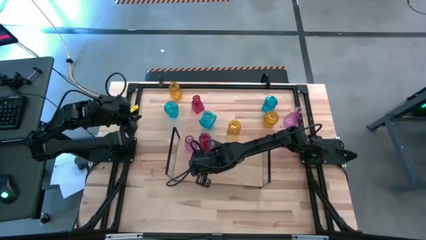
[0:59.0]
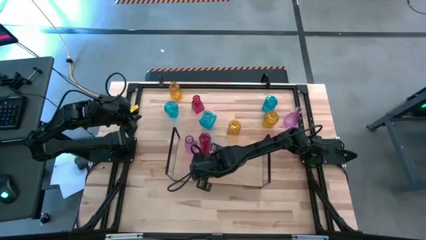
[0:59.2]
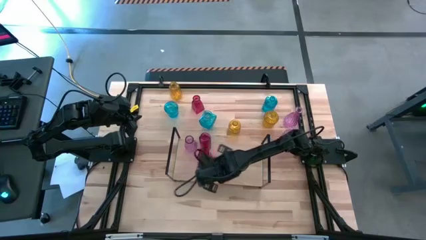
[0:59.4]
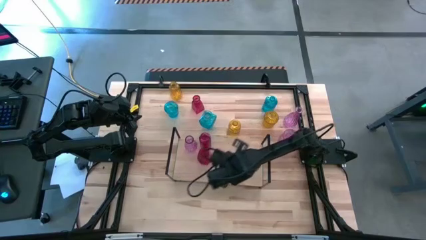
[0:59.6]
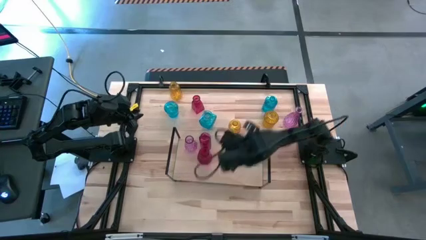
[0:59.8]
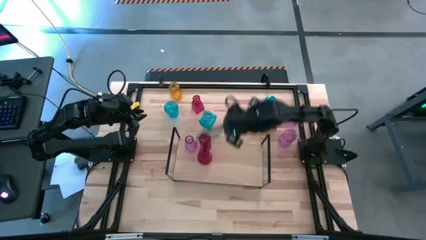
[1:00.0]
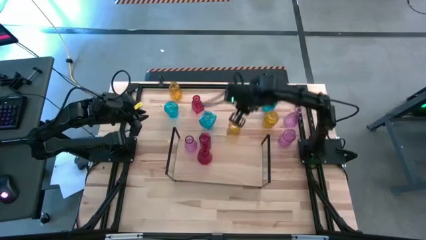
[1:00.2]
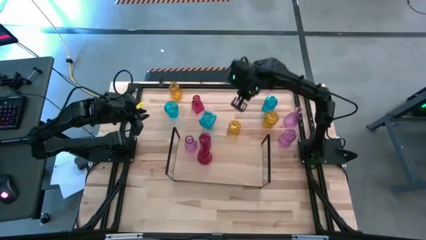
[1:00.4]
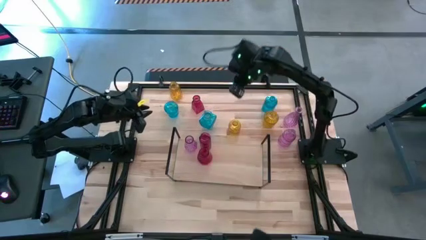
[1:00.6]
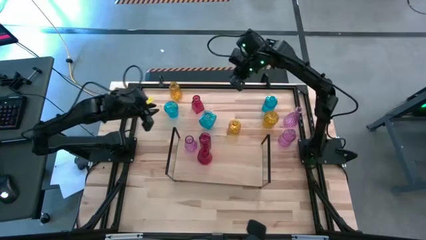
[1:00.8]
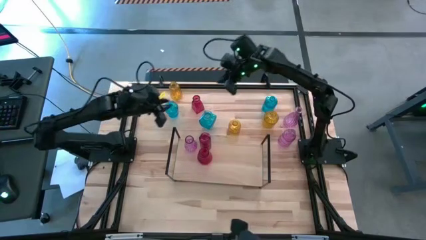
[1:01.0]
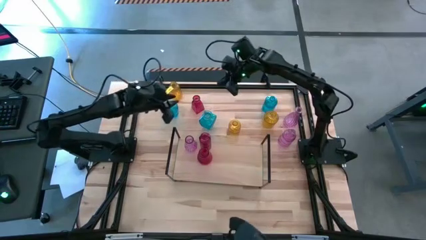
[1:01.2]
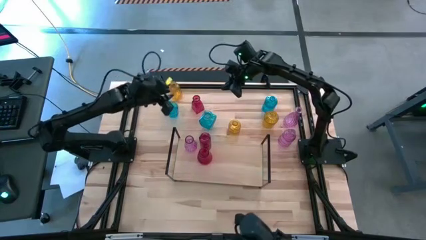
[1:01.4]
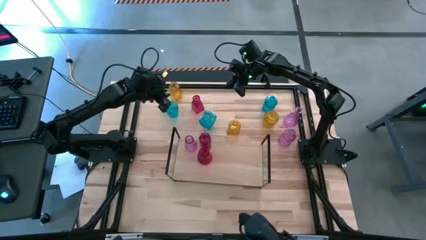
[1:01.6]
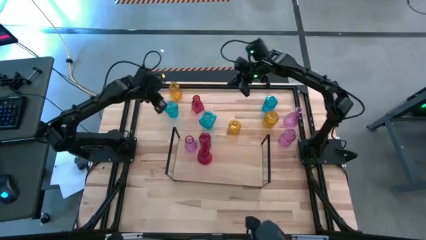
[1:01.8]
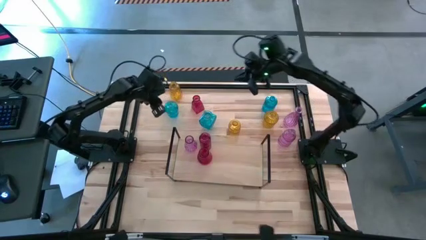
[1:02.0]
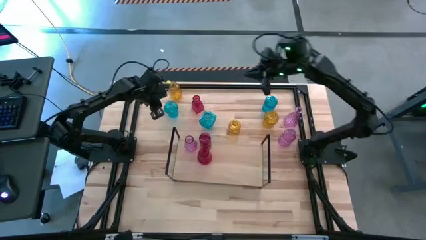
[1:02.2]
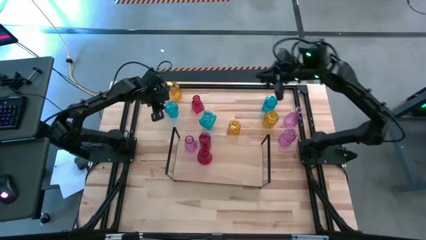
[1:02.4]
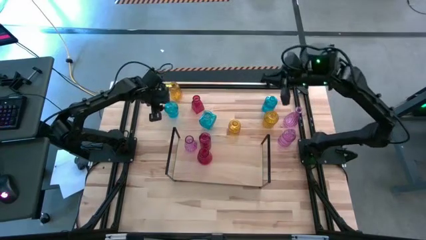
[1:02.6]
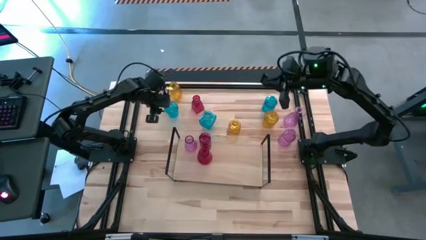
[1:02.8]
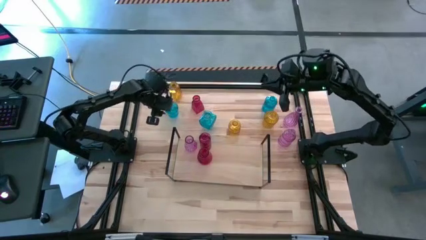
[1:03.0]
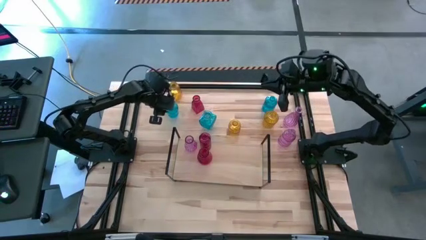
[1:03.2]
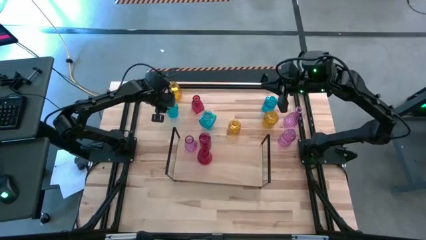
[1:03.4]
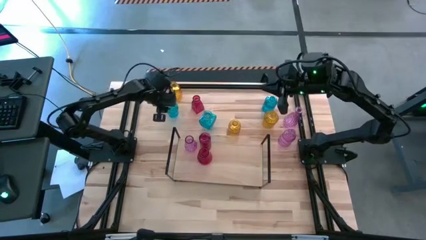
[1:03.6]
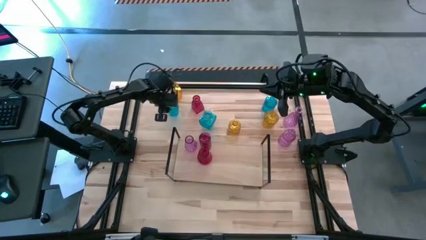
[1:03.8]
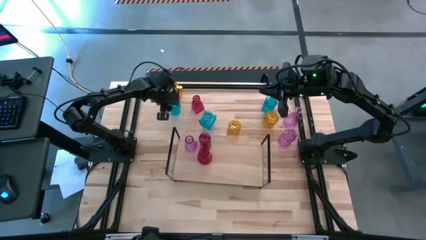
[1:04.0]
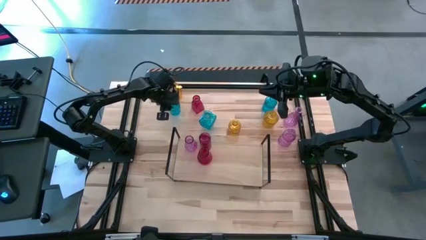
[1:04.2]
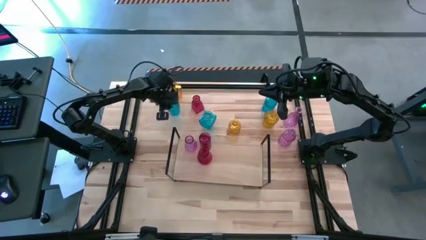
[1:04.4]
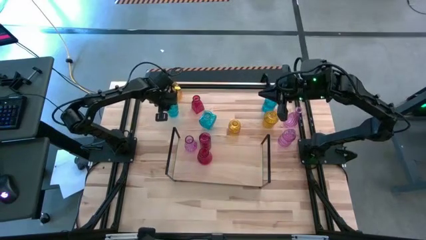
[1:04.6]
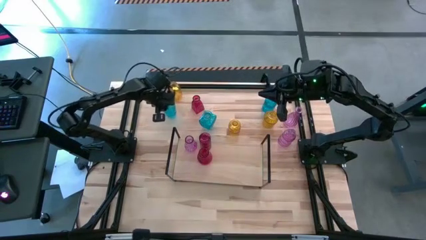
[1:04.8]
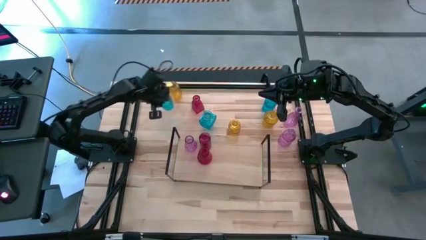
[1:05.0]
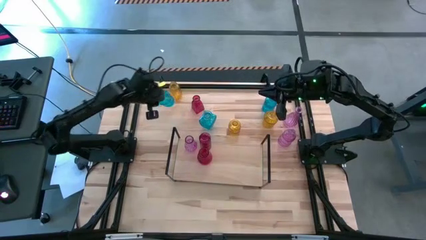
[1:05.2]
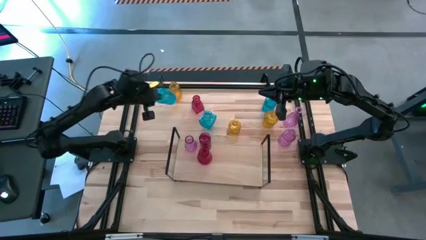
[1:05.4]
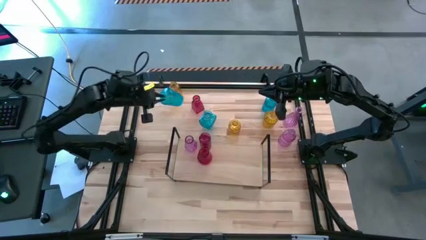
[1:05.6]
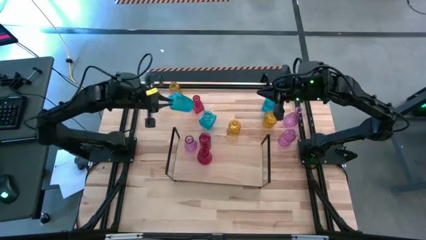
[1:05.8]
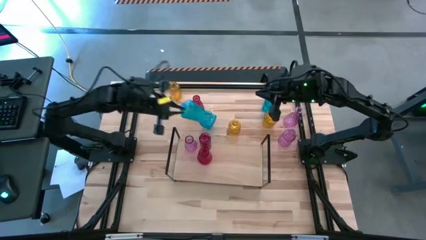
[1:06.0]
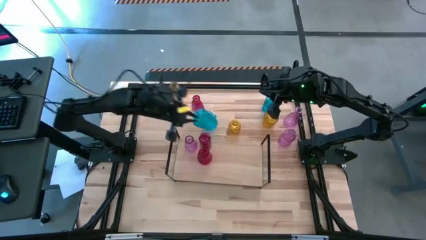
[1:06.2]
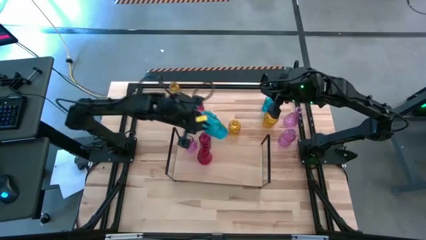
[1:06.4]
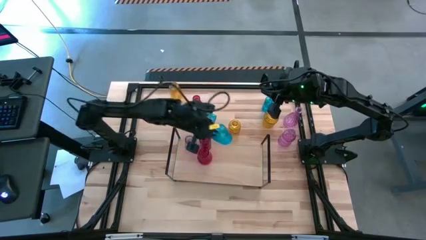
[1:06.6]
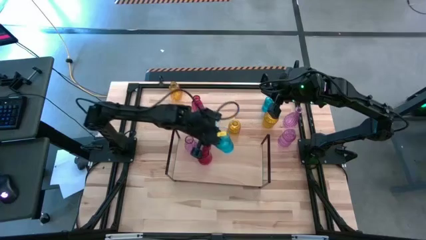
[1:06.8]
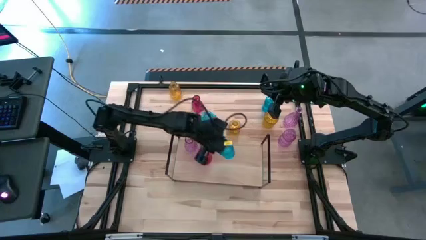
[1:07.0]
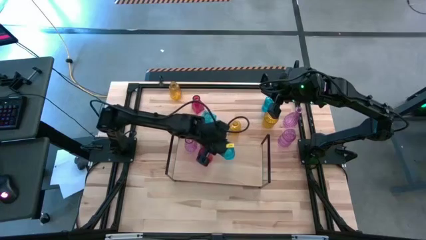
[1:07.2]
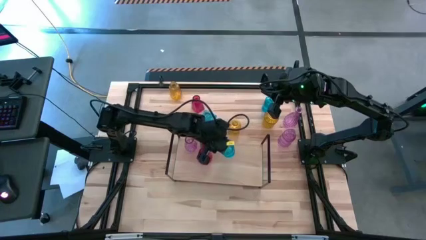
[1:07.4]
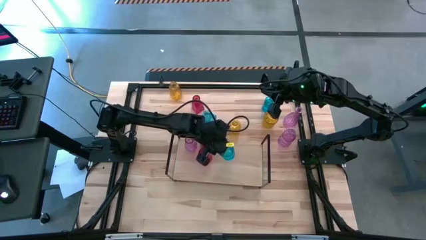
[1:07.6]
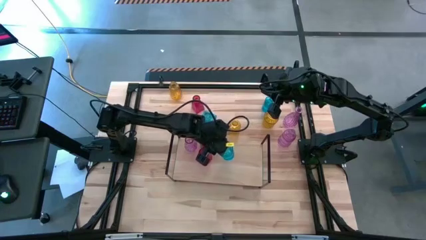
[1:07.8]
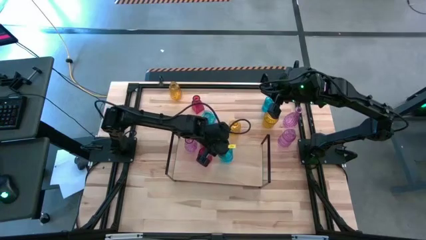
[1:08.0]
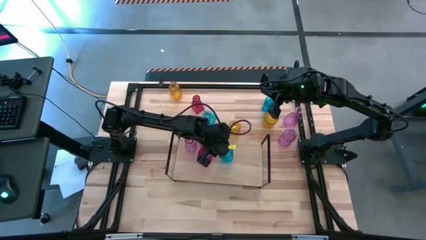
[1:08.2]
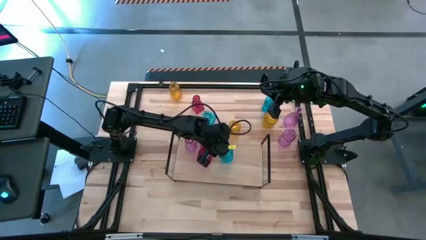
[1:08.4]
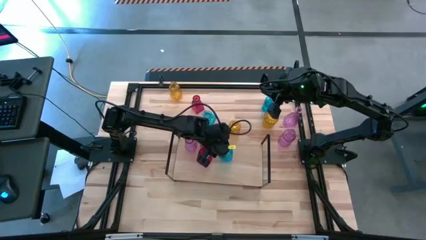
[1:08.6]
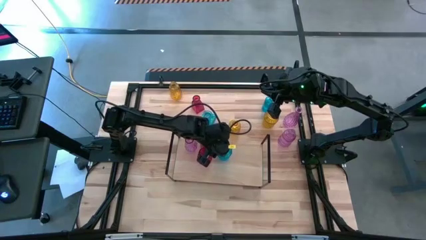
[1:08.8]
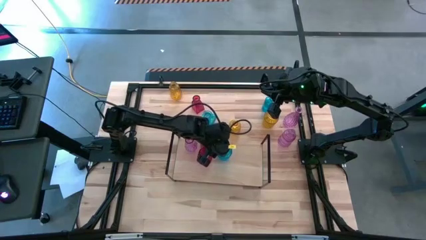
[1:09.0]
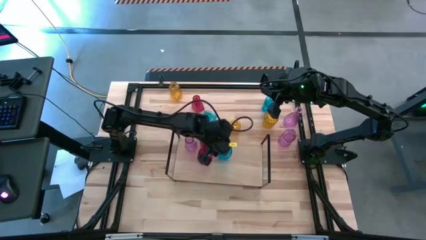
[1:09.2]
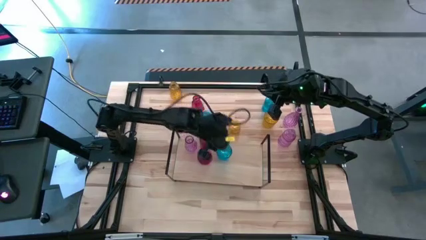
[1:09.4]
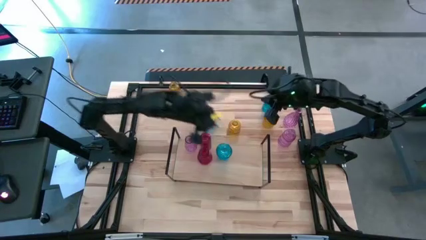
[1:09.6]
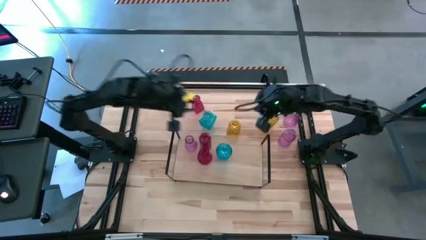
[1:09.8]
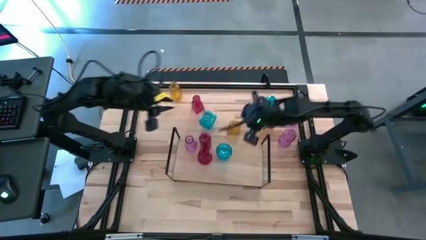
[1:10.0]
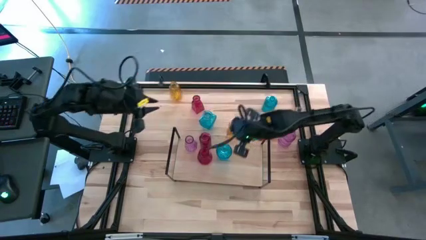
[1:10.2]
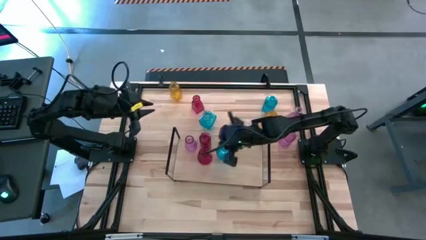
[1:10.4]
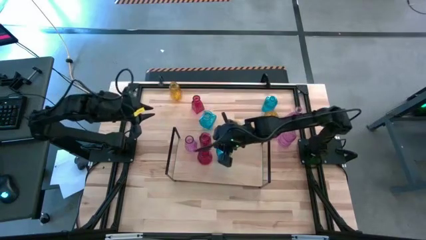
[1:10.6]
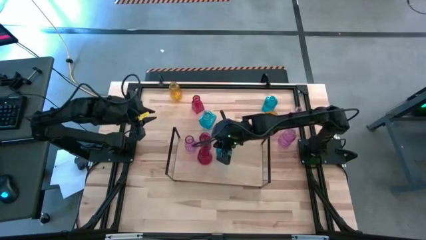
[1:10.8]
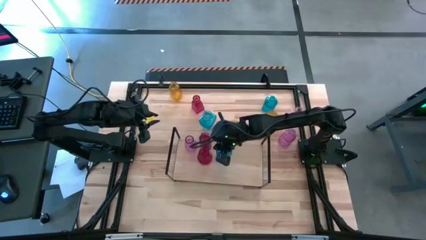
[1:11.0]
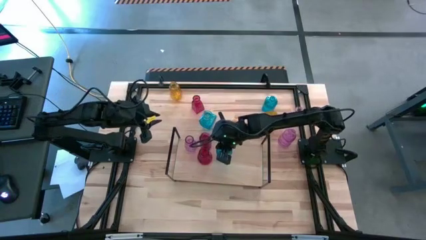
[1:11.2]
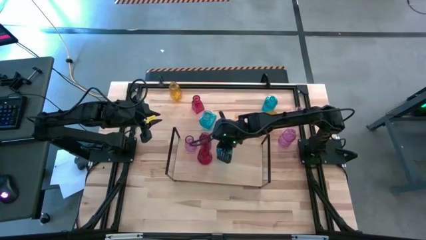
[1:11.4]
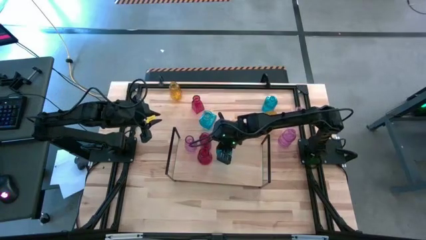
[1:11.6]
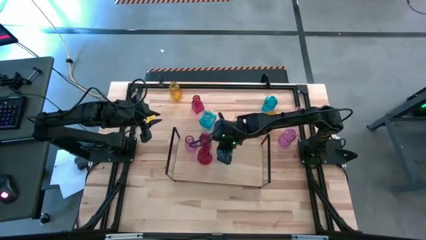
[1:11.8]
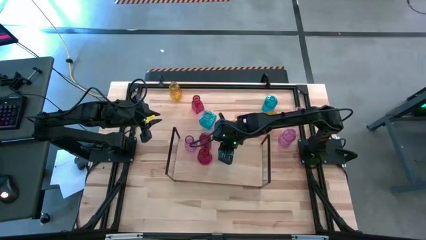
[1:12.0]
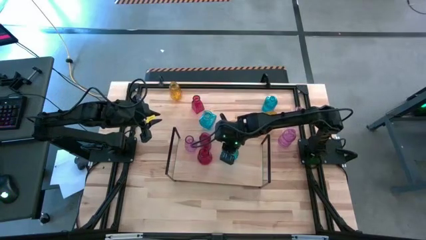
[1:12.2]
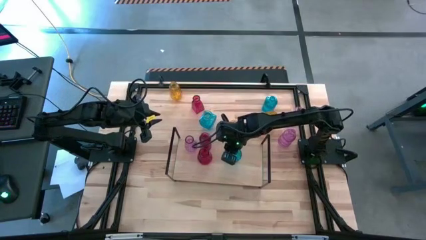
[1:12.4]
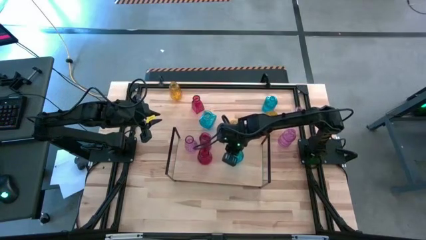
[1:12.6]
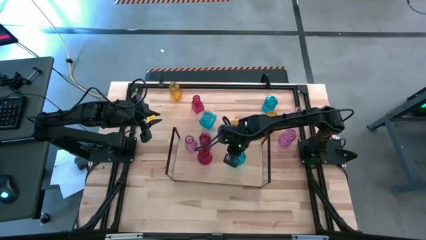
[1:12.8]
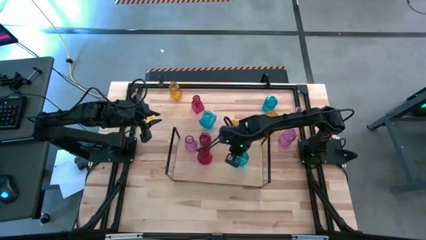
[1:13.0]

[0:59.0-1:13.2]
Task: sort vases onto shelf
Put the top left blue vase on the shelf

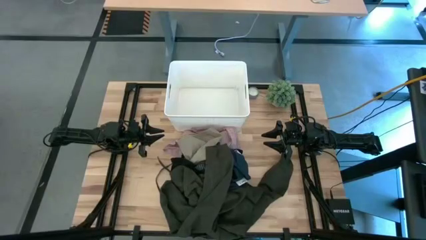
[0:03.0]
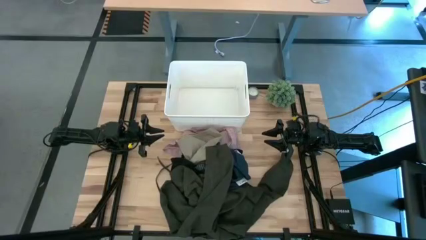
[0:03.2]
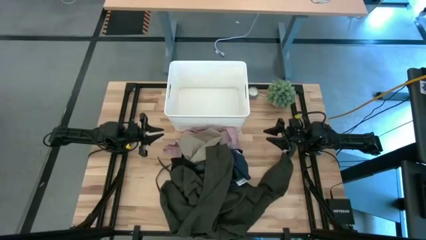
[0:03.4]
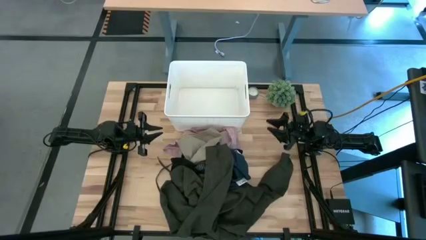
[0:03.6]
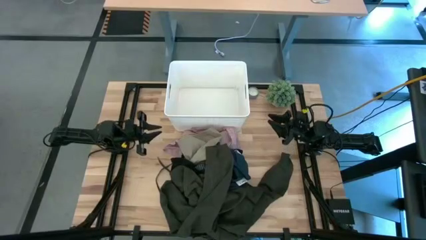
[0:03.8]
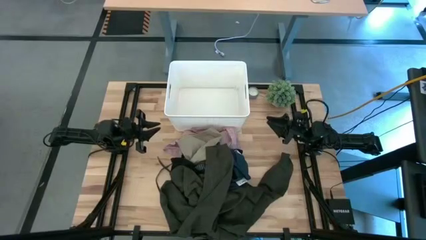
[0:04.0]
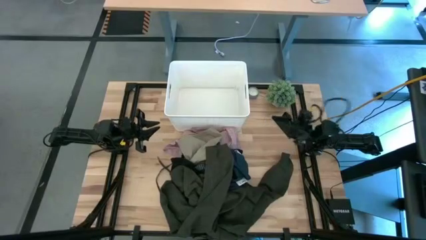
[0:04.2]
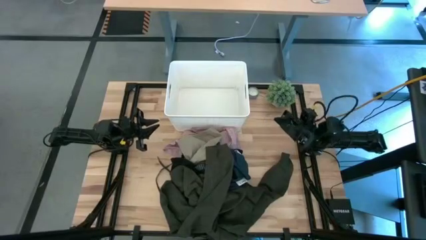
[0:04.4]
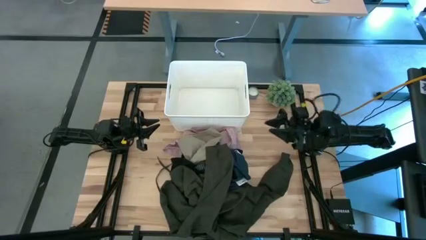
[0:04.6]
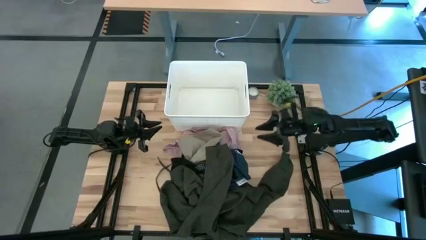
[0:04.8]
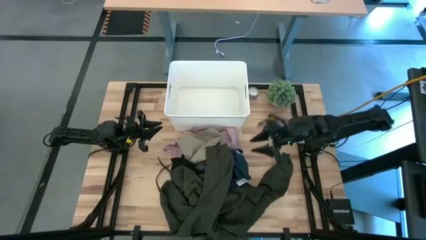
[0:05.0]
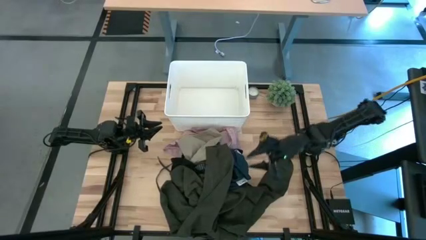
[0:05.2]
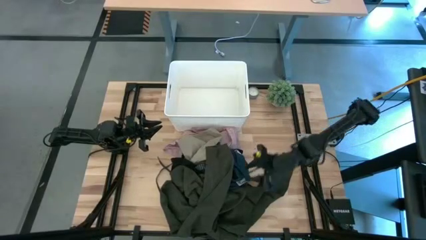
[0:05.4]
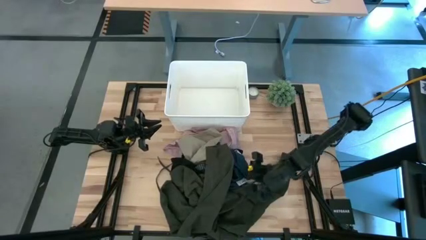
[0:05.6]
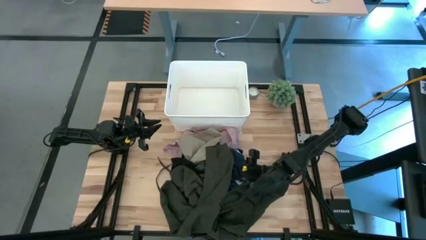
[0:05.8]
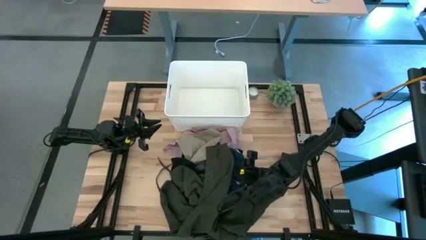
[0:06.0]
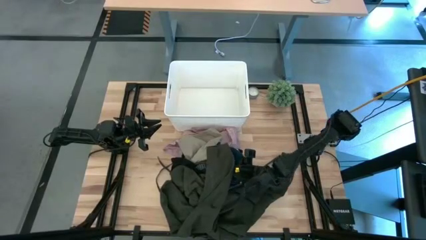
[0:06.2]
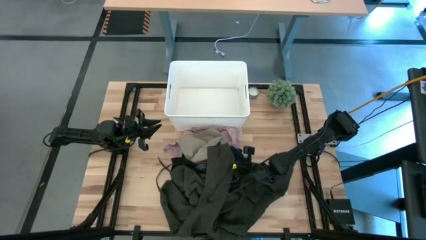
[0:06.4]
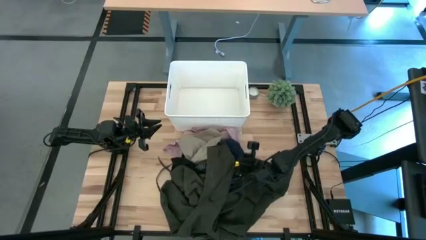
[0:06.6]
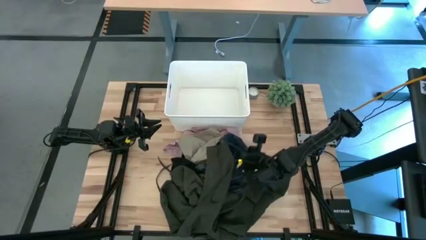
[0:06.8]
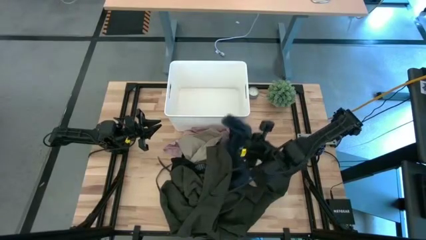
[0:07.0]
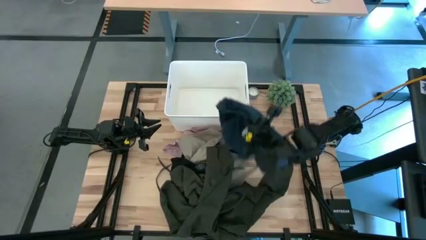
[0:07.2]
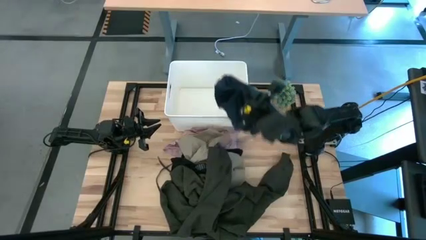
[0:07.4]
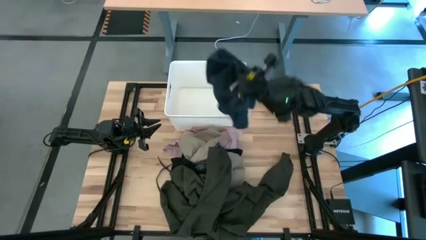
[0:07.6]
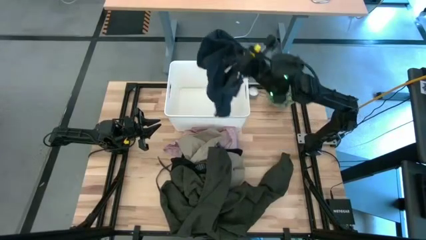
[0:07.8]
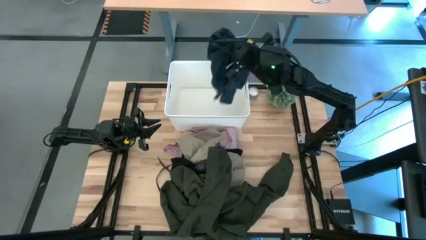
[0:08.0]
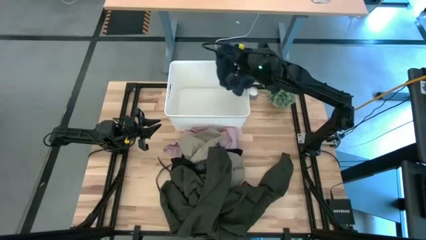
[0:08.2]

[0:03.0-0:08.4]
Task: Sort clothes
Put the blue shorts into the white laundry organizer
